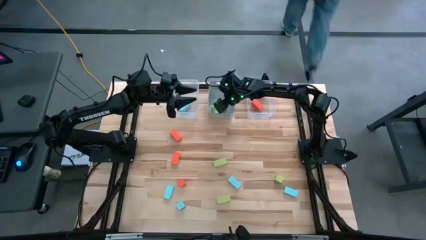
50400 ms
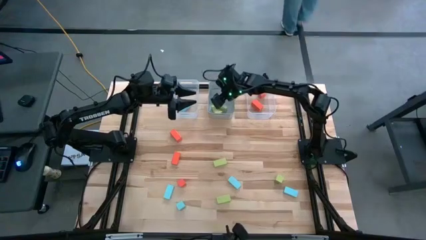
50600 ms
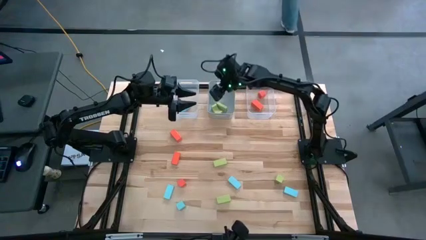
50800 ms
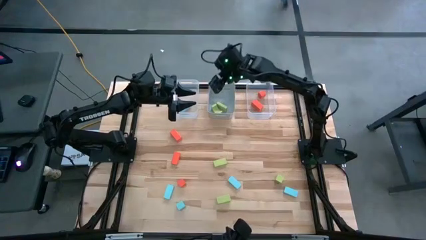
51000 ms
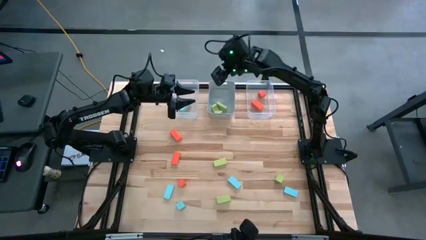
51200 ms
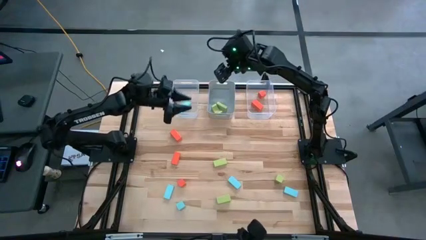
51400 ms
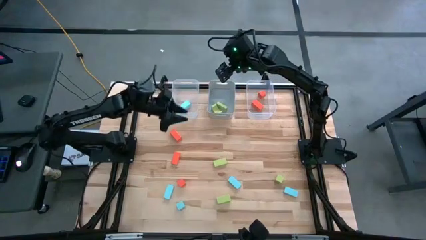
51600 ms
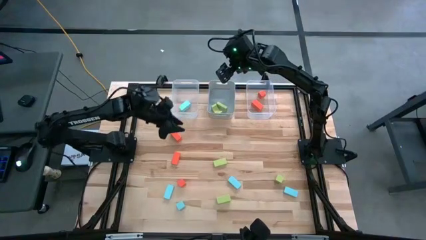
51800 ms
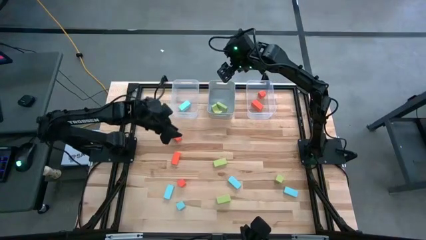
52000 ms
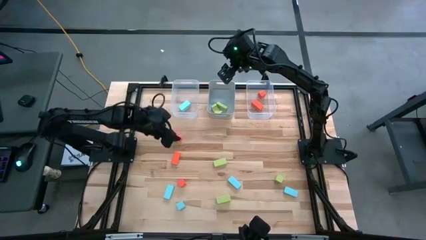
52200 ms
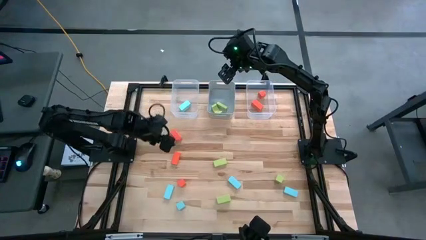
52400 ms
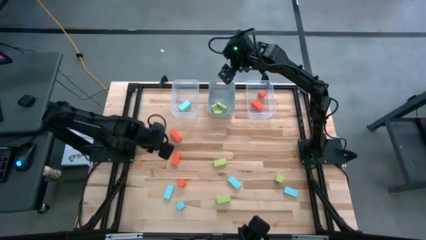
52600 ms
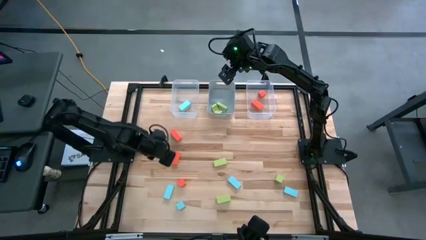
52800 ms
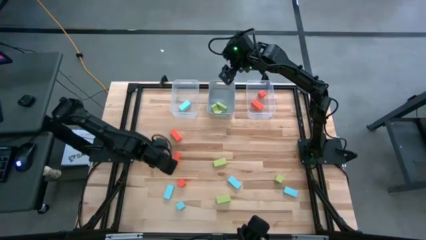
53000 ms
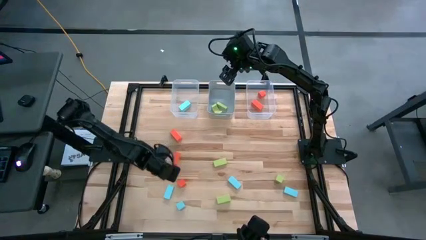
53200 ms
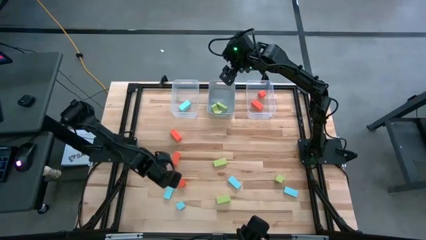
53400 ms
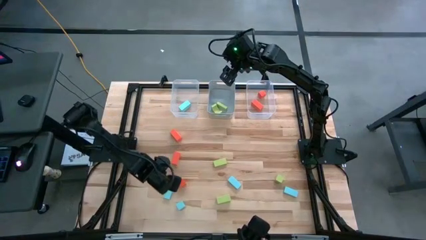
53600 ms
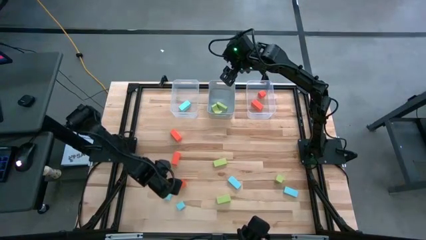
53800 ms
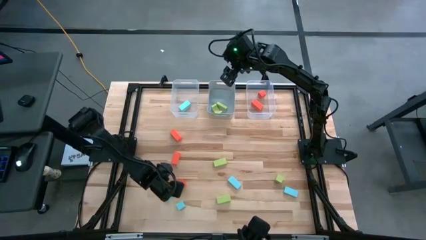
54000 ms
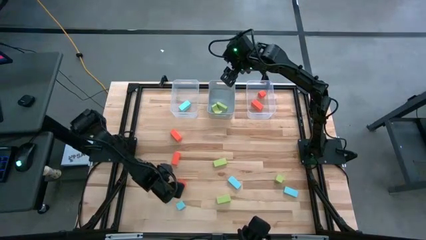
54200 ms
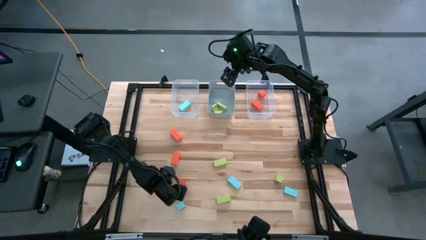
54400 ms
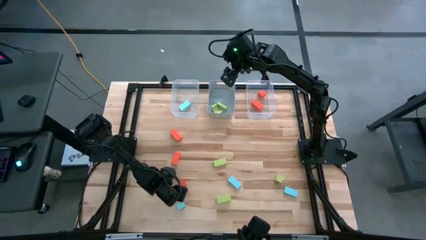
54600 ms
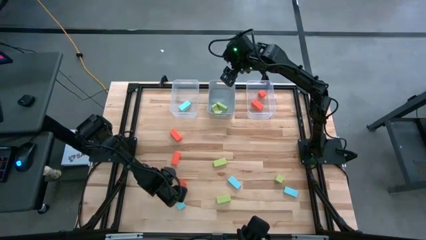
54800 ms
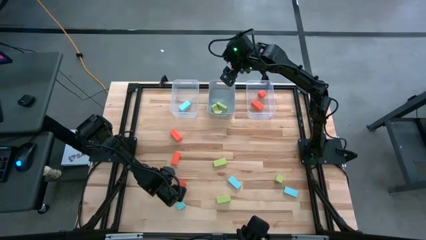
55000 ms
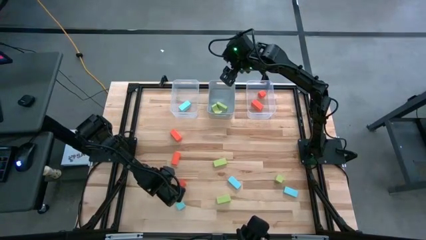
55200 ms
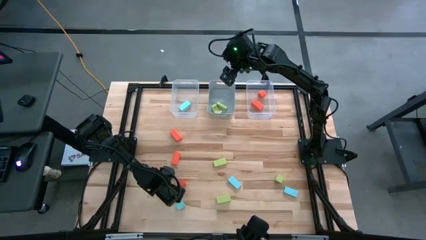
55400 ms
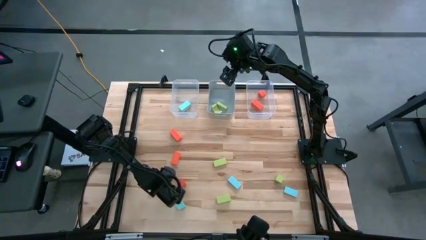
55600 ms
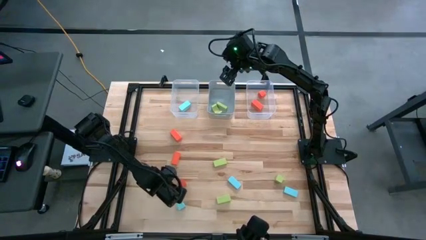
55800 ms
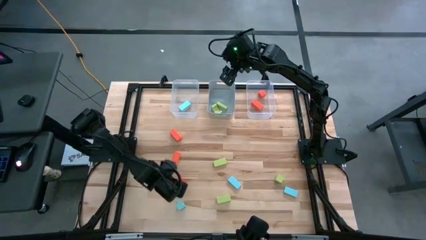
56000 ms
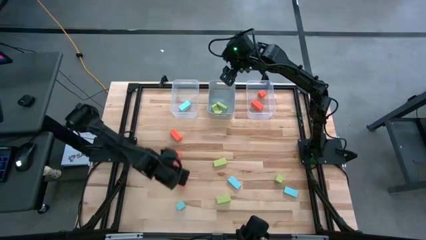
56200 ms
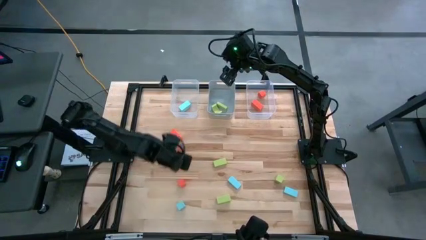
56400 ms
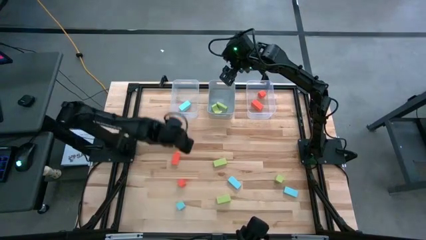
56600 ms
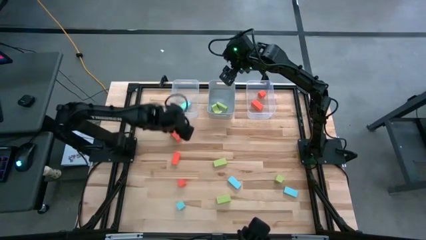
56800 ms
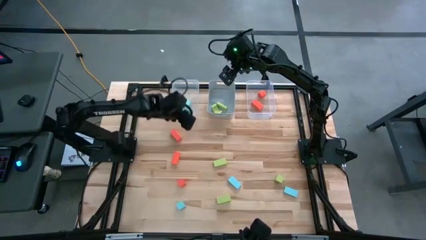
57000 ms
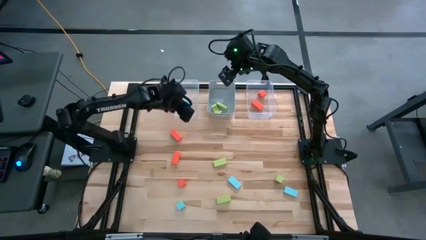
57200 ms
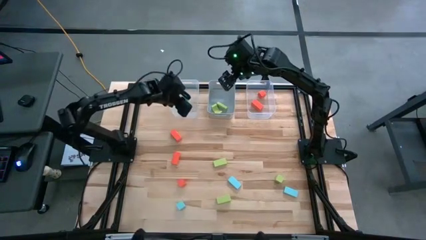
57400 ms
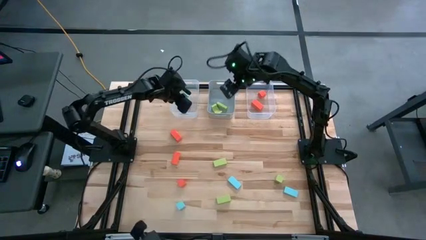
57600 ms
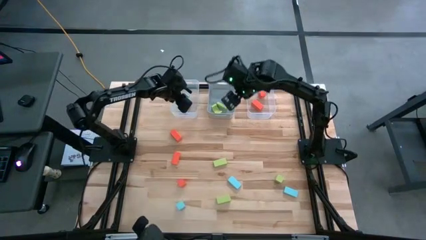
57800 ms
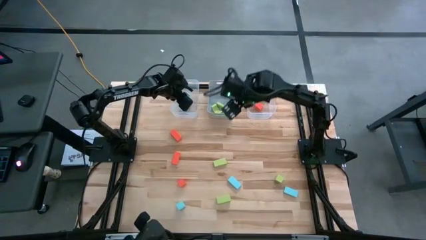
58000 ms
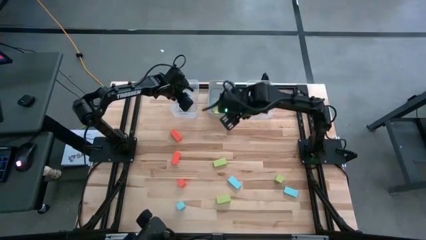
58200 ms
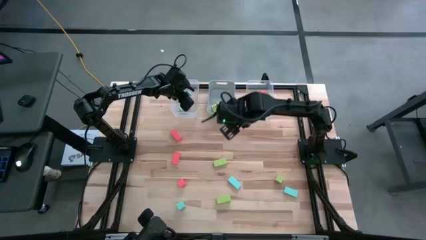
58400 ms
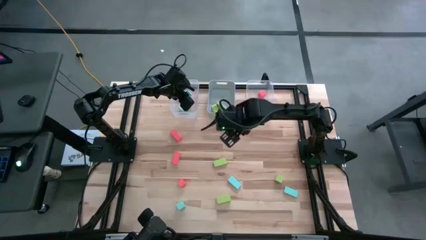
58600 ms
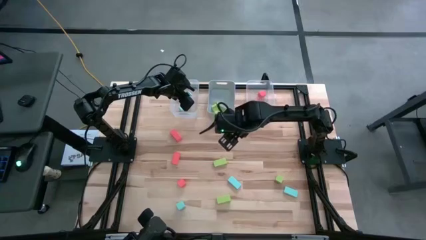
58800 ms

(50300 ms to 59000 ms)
Task: Sort & place blocks by color
Put the blue block into the left transparent bin

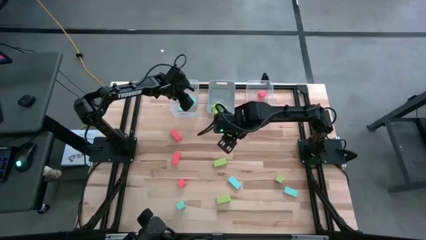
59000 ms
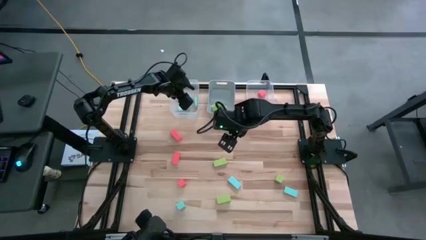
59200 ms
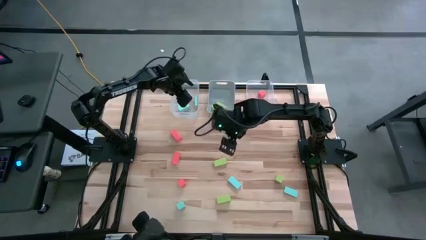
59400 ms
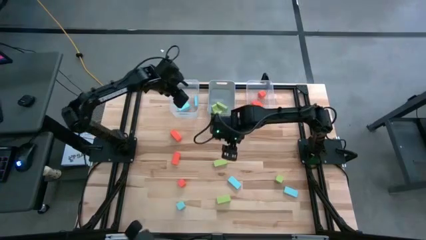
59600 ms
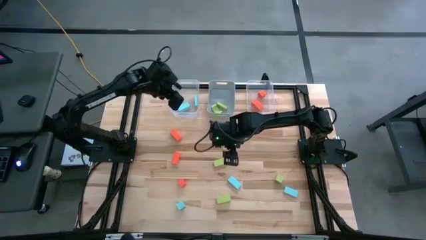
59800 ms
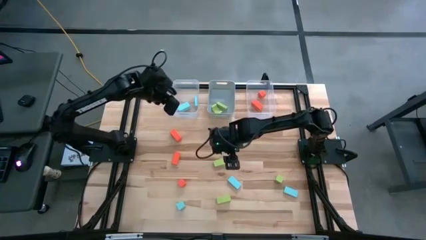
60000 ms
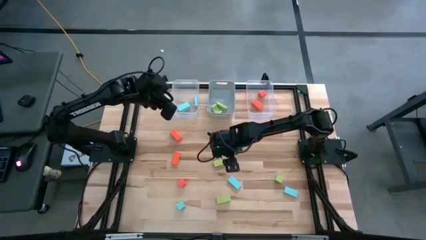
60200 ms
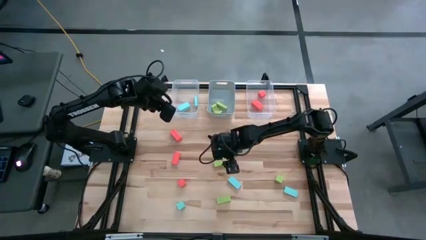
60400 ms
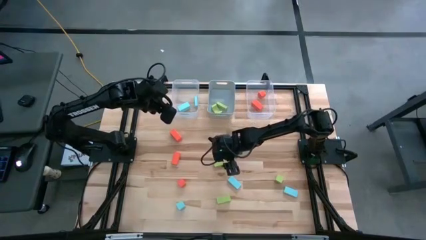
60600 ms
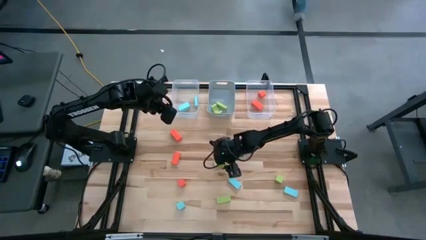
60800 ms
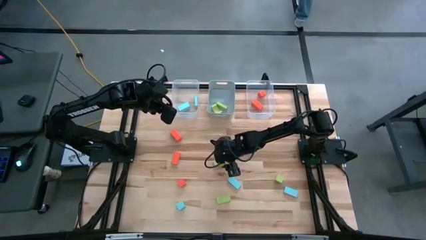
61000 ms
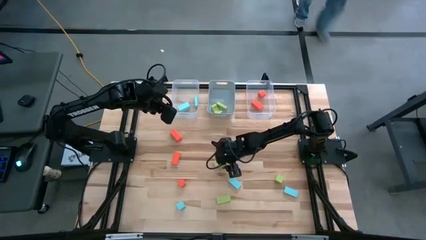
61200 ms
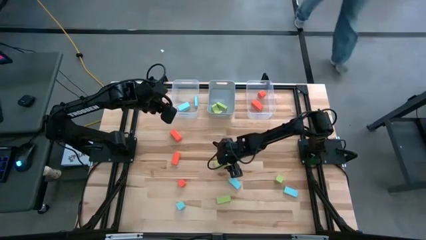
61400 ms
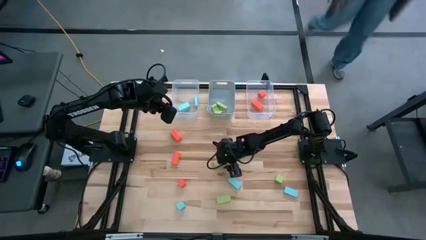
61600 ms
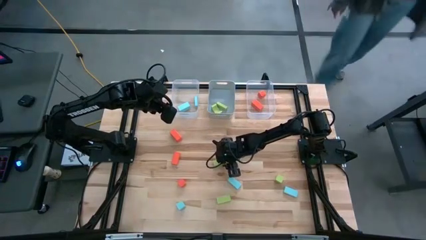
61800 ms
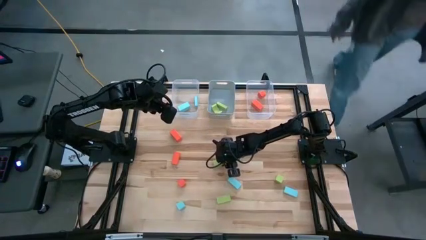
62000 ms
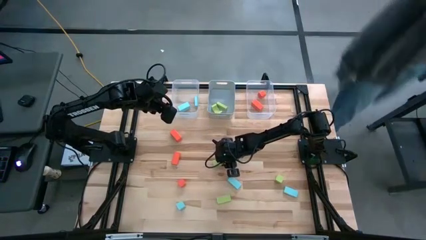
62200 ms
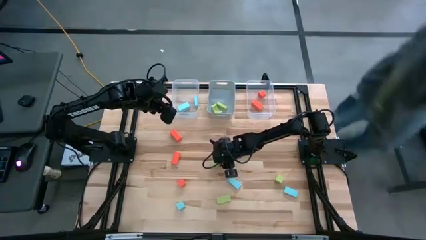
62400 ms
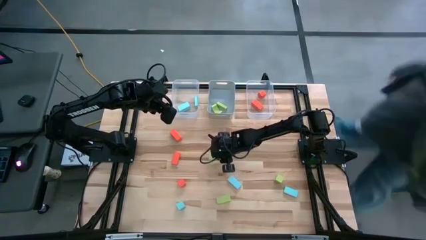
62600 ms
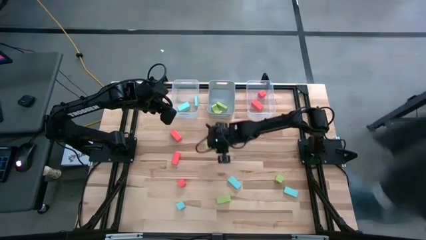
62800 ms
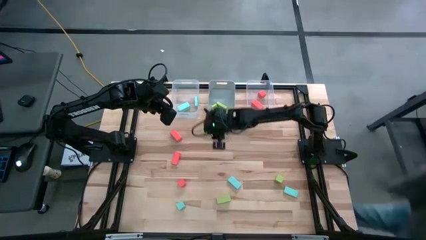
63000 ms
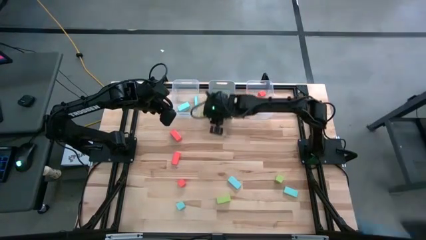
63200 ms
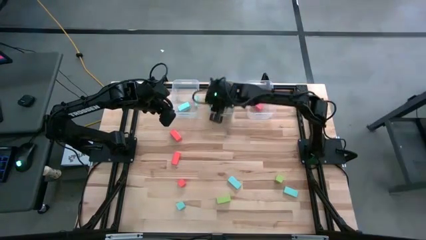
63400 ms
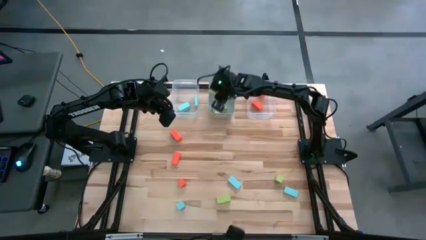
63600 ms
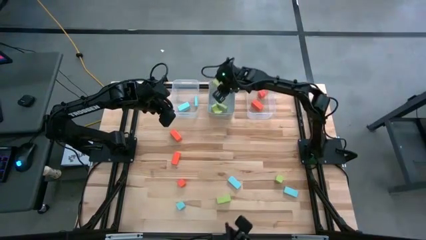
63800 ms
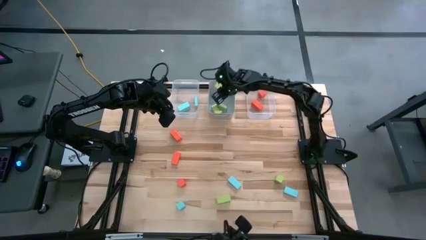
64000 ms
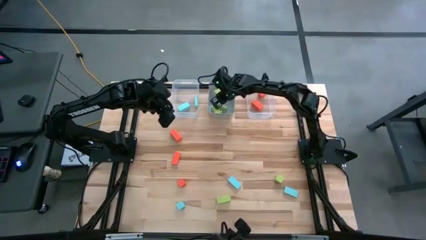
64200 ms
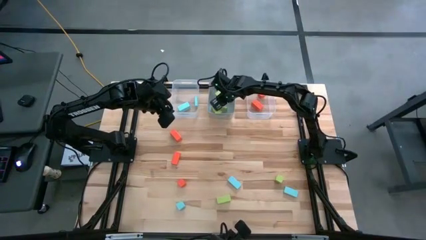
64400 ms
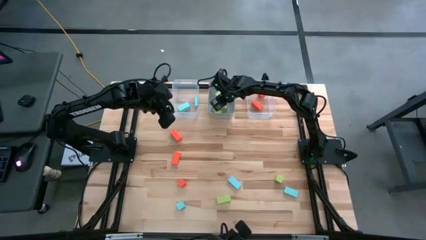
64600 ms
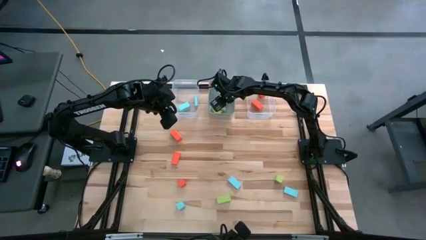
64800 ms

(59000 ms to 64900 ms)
Put the green block into the blue bin
